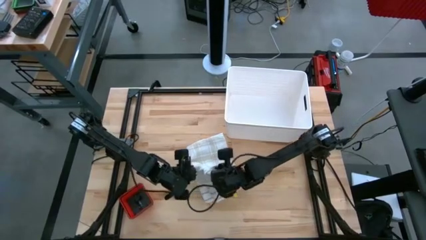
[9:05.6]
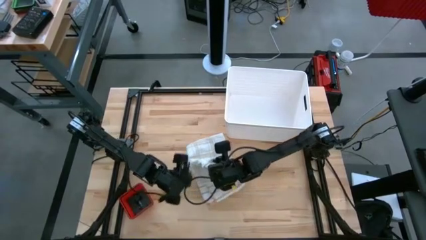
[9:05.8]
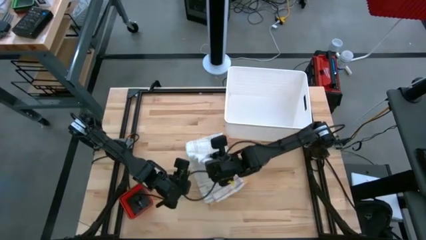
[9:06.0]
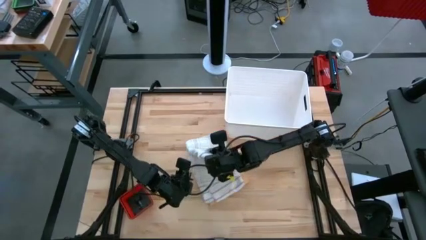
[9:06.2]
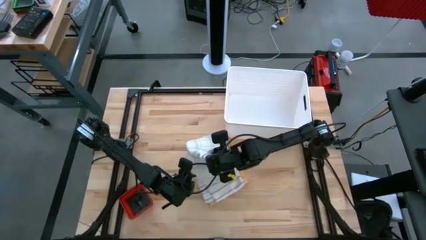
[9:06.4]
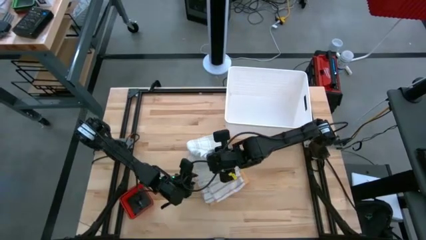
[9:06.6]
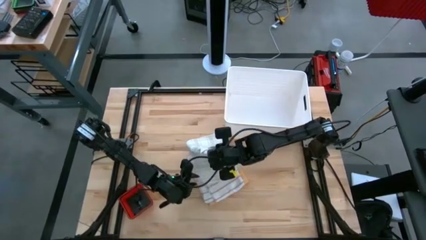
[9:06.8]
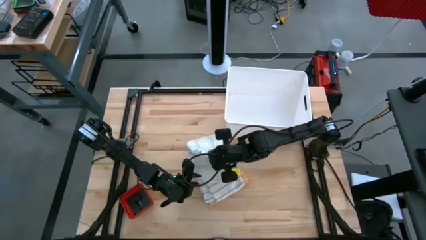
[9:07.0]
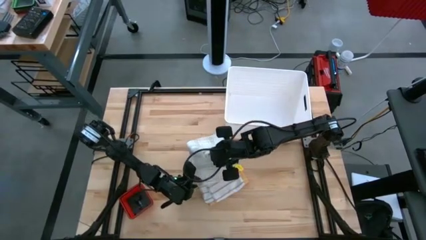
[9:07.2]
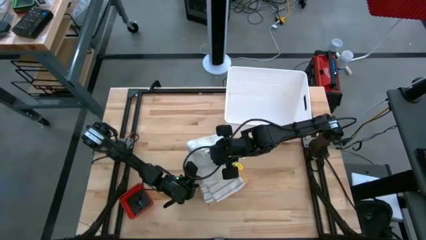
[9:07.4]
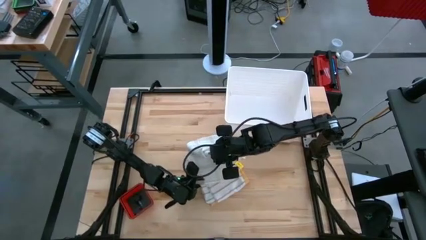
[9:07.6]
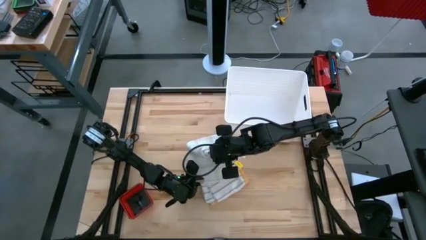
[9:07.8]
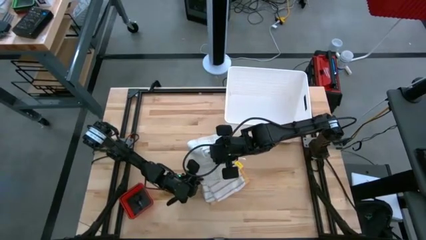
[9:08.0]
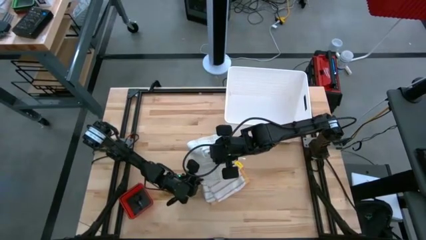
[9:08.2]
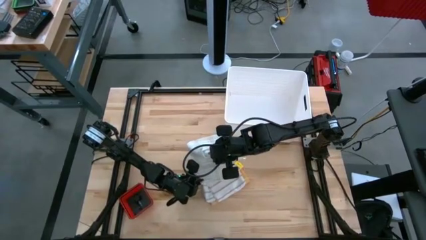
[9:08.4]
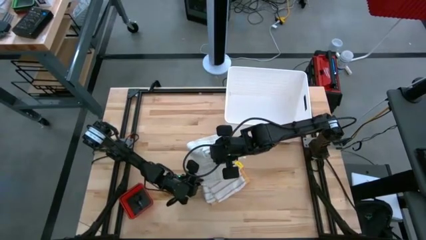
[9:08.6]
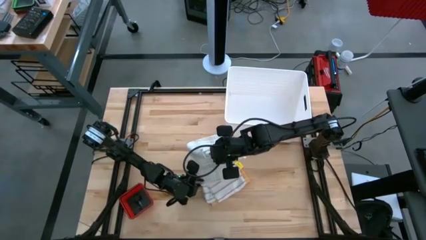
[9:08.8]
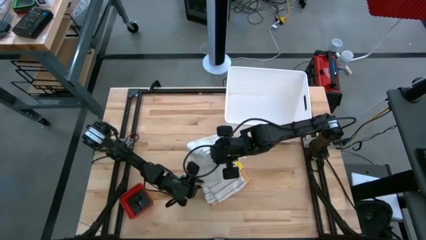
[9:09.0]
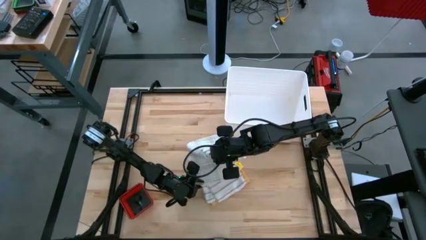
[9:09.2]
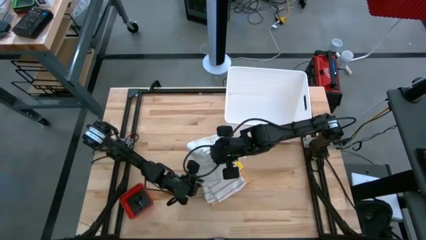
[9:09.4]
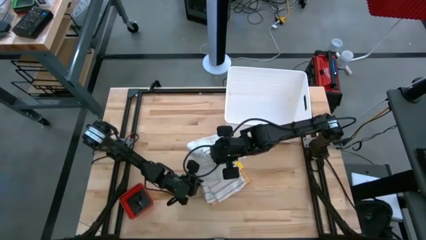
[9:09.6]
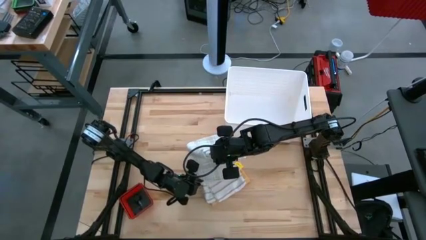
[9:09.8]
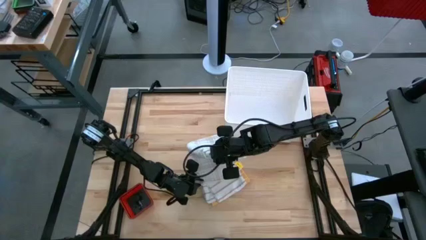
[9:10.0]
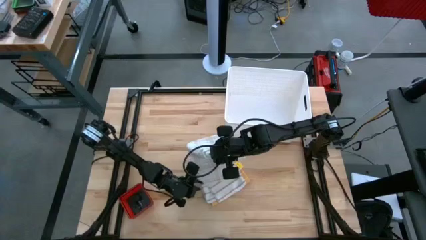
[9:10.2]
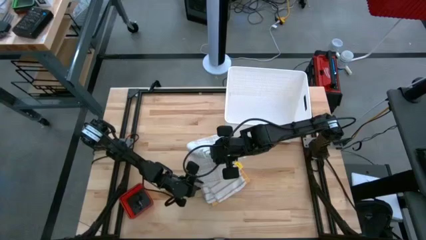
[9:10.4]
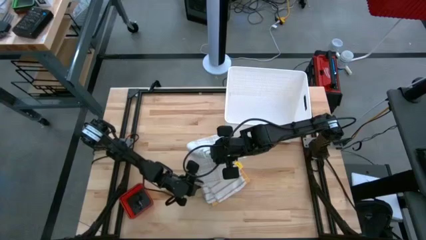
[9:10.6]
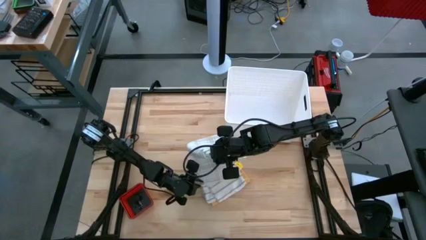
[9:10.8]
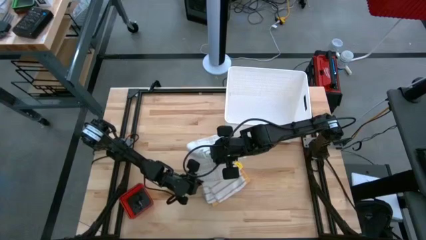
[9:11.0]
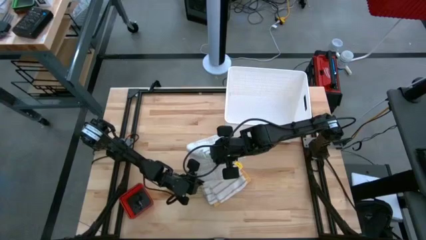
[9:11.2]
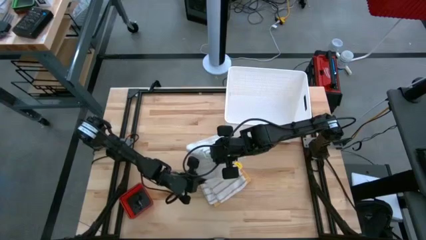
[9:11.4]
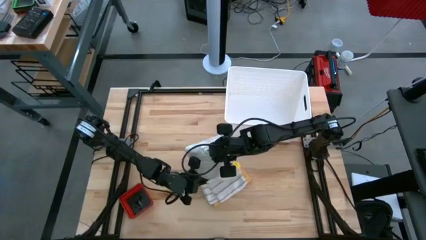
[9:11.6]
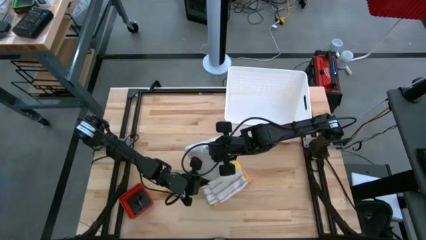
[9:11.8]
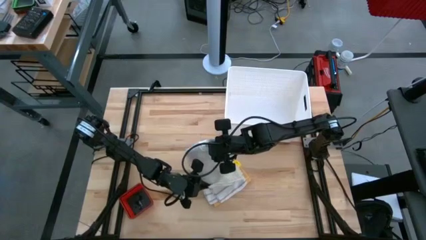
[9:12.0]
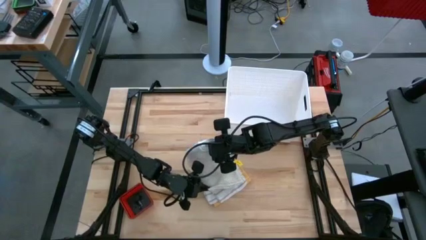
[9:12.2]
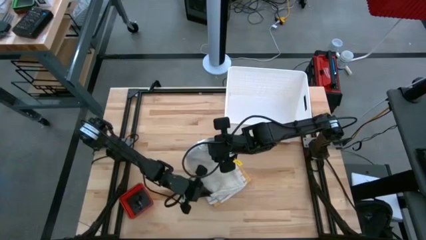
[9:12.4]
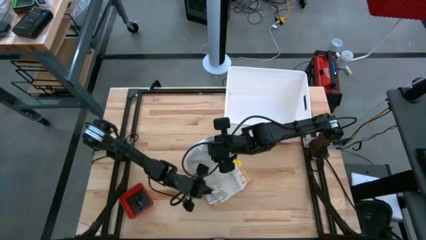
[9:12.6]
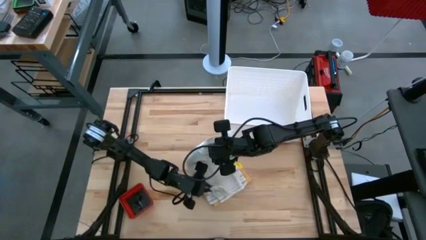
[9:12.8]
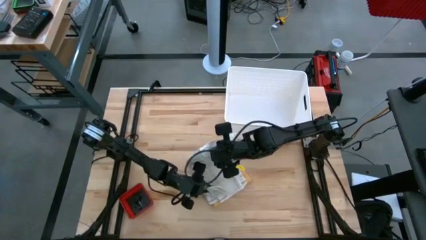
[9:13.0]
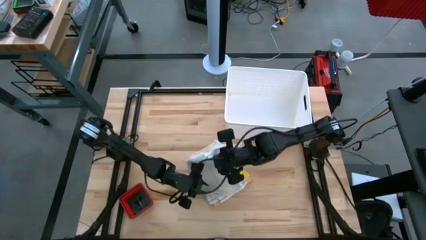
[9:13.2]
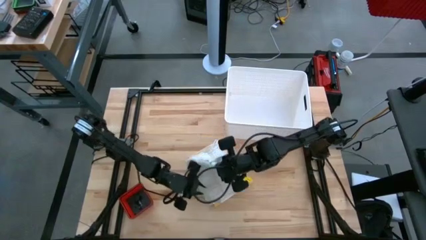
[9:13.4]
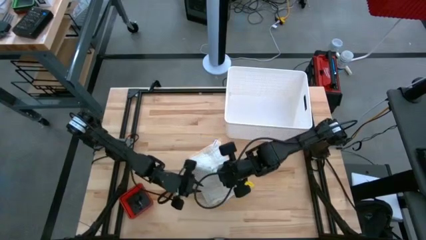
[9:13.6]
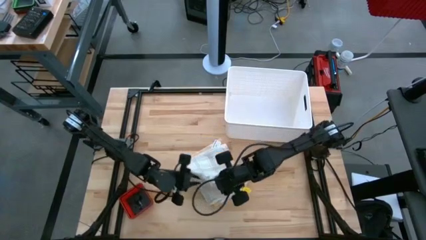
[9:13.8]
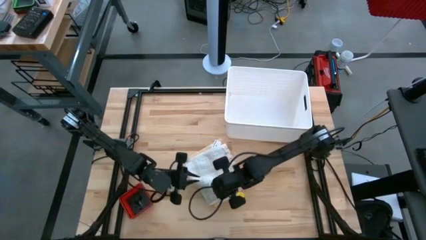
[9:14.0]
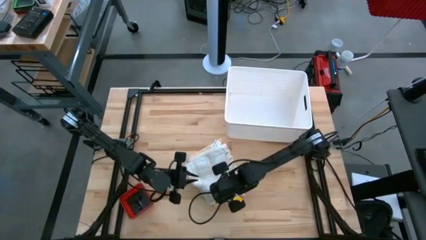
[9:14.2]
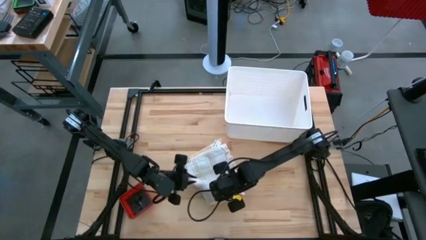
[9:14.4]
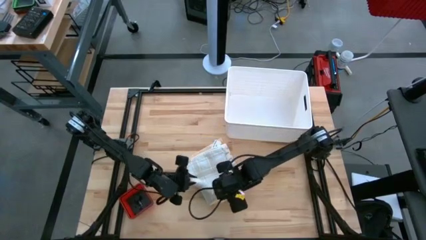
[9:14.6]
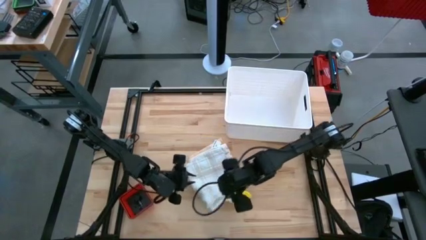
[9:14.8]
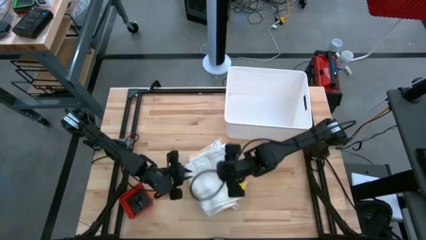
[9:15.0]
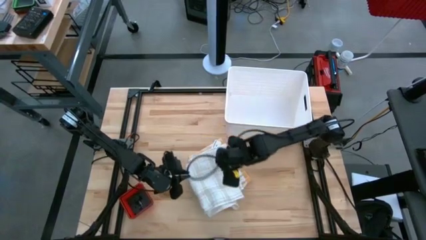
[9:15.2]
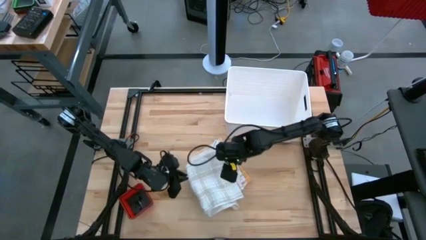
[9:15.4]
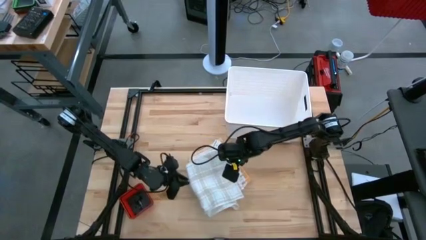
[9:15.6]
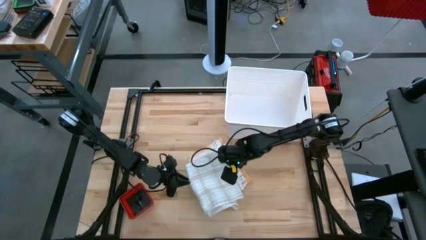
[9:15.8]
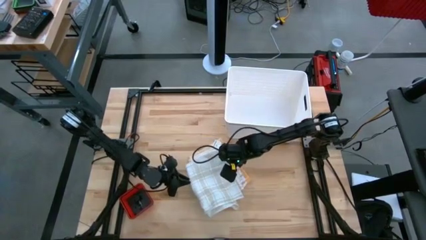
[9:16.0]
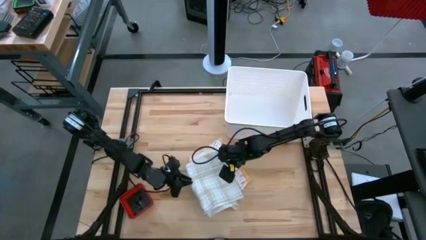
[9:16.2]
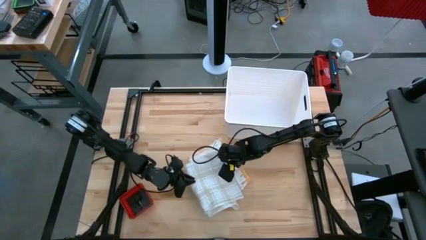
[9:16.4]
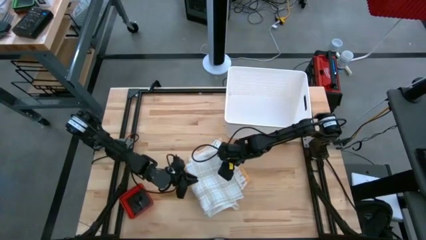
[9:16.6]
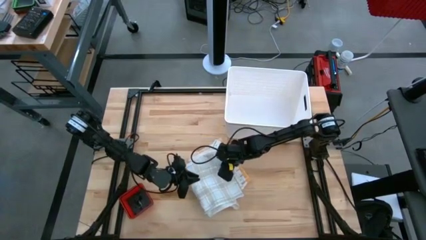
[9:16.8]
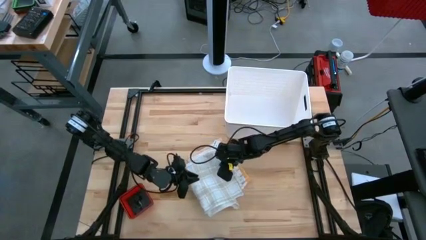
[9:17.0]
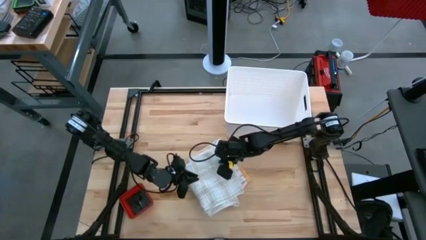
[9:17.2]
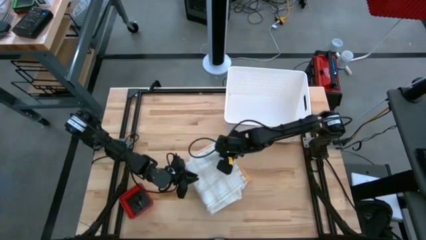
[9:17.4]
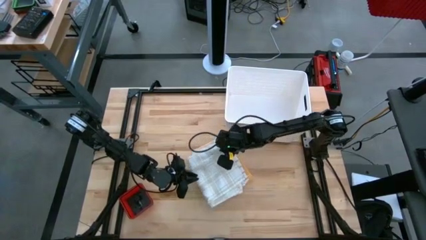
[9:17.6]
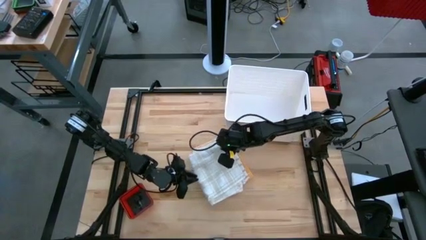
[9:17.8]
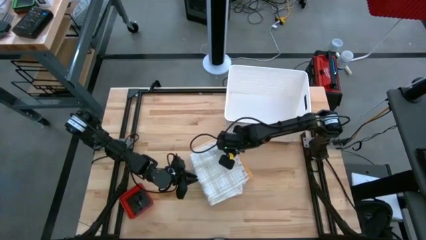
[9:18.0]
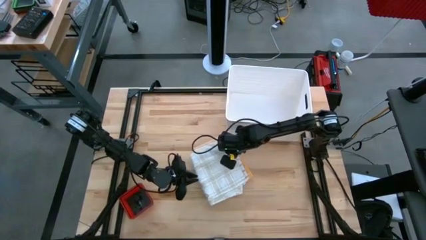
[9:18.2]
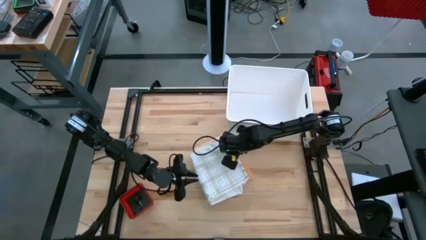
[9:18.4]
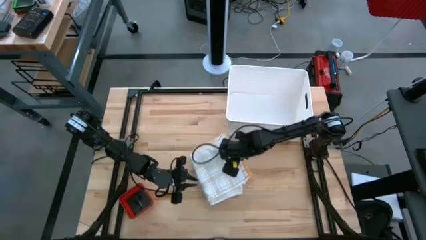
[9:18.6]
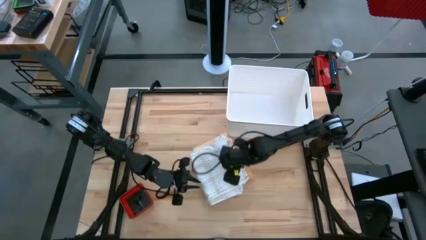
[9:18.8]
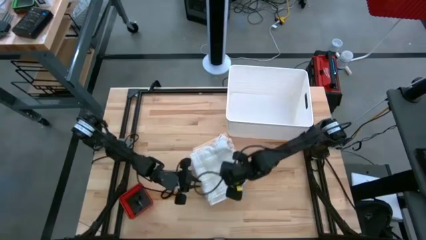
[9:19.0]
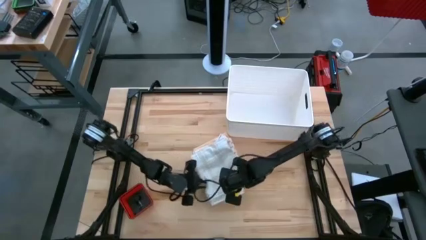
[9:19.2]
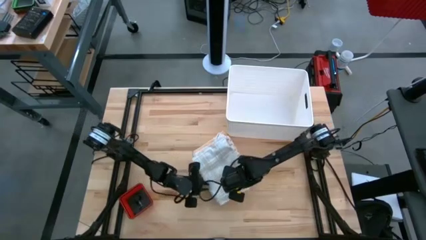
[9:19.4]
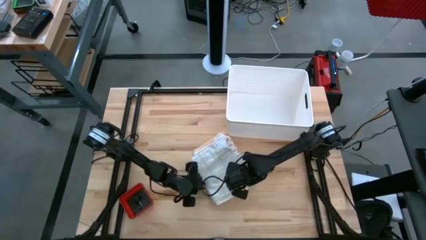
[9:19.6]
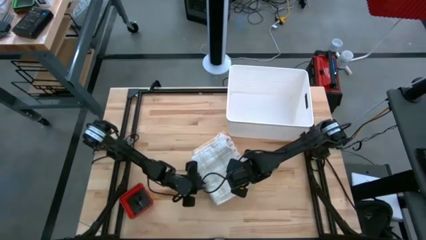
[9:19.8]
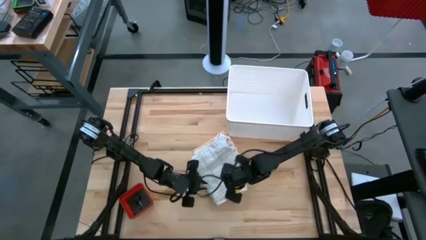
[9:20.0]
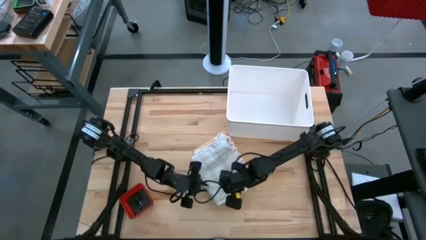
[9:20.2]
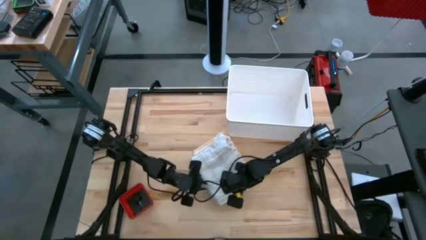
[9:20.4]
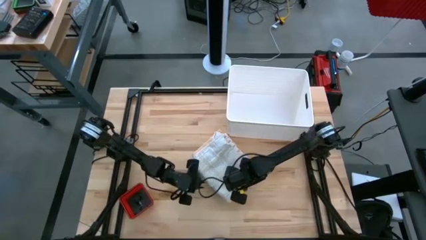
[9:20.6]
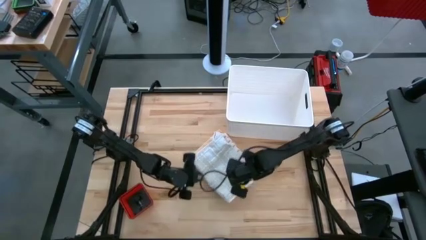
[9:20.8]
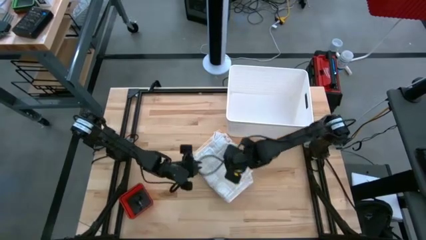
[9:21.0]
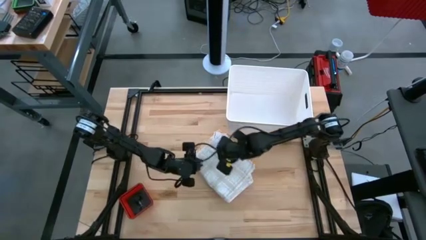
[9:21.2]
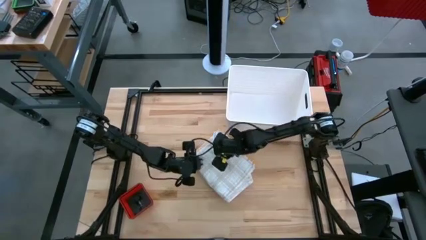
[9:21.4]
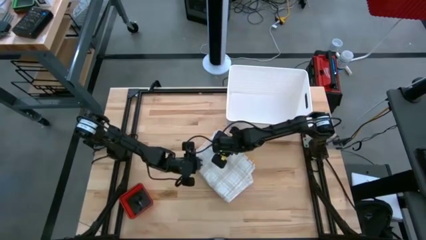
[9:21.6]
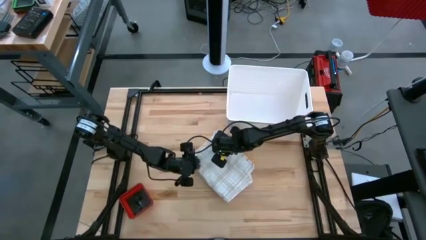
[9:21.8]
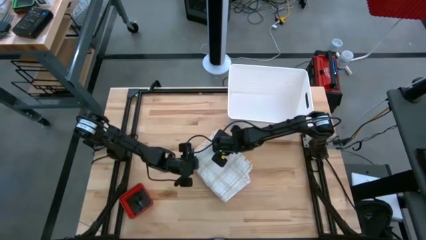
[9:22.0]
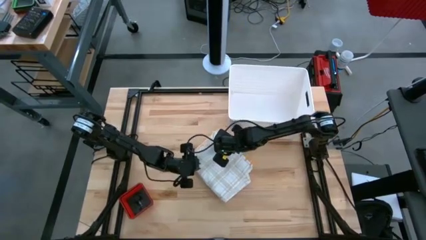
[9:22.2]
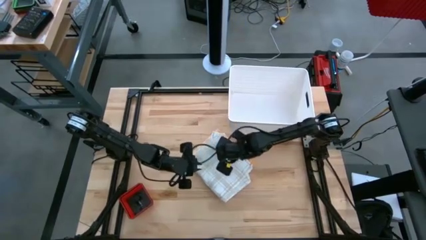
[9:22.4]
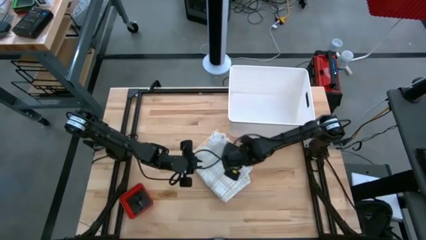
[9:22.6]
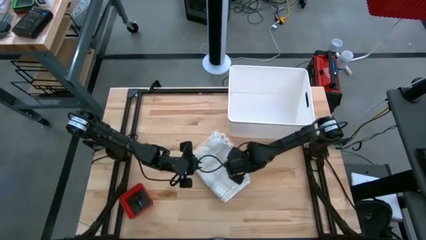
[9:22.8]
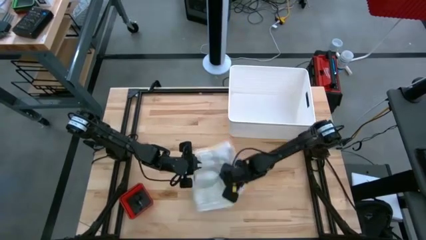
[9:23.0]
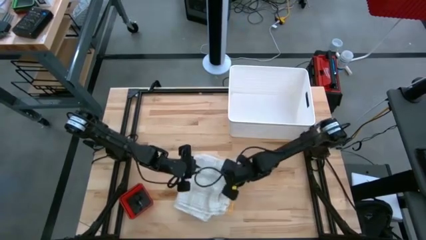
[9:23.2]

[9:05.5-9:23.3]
Task: Fold towel
Stack the light gray patterned towel on top of the brown patterned towel
